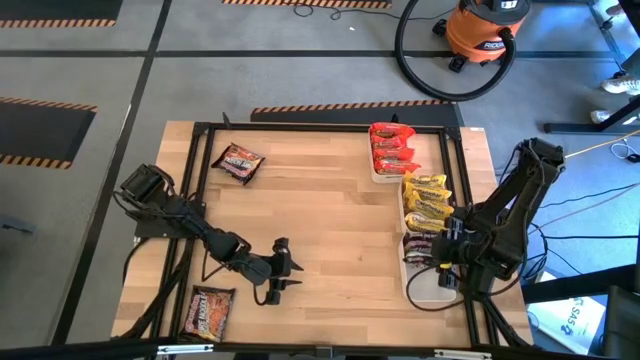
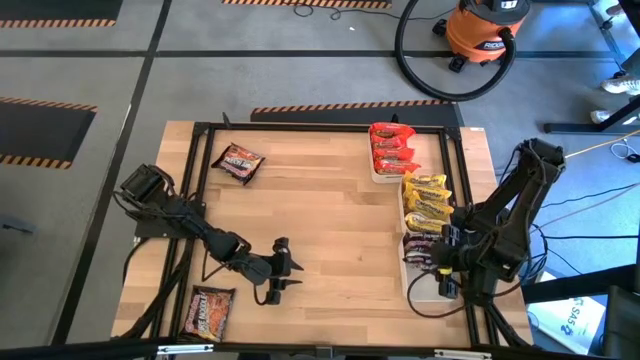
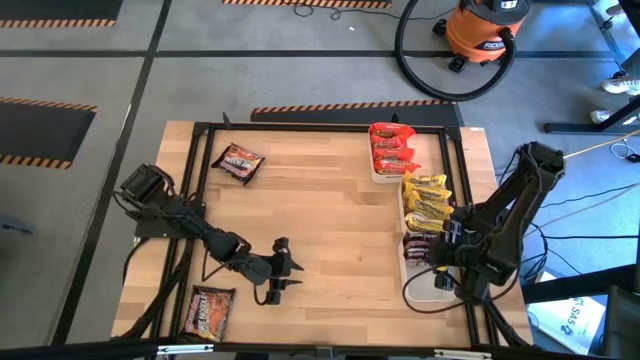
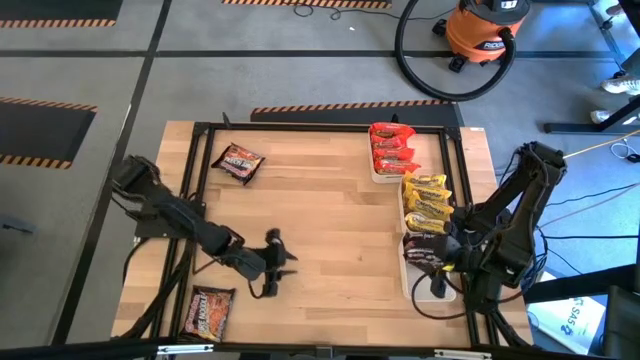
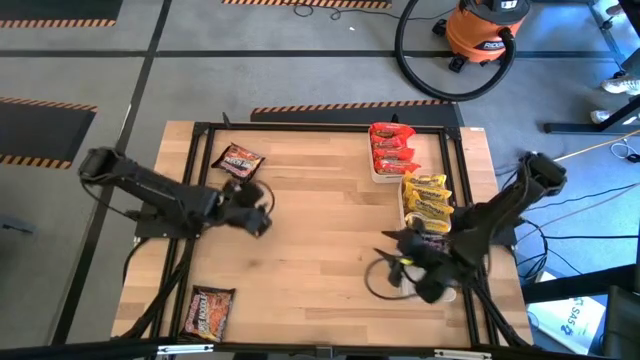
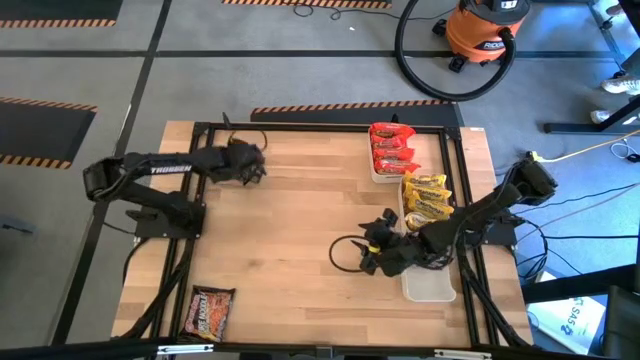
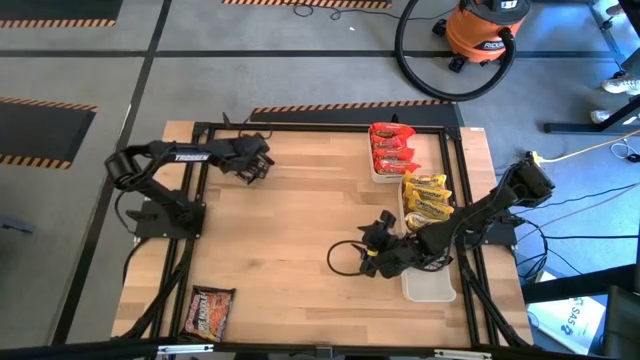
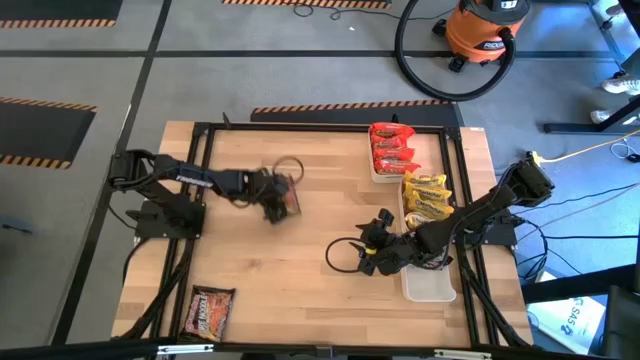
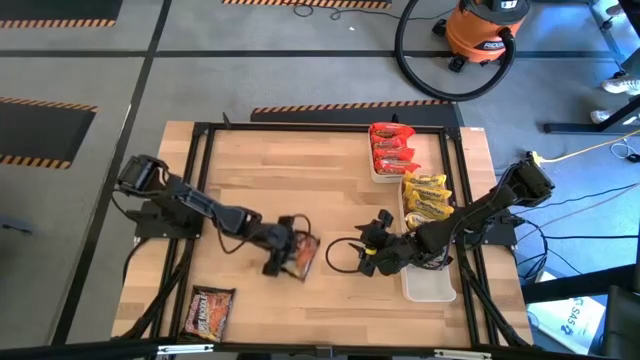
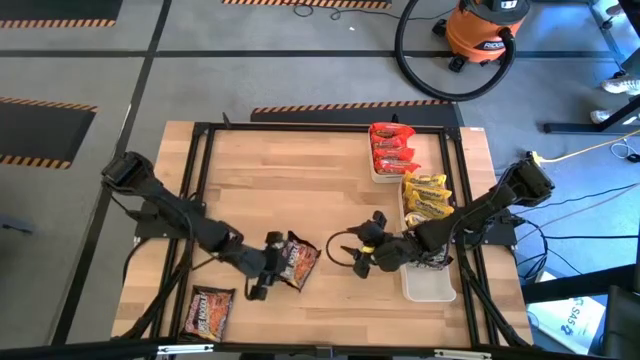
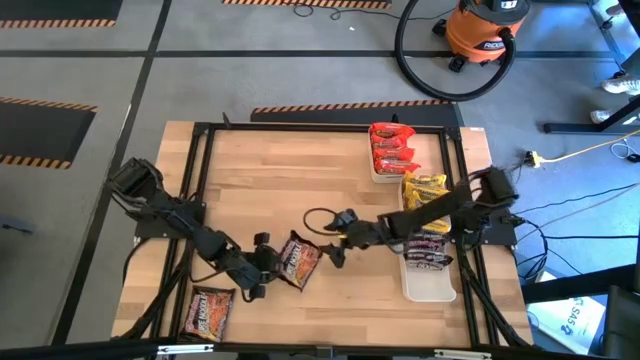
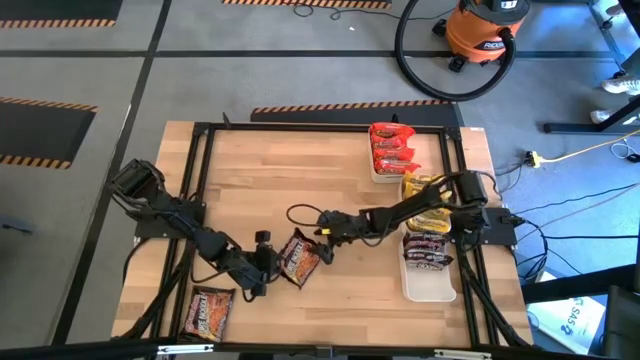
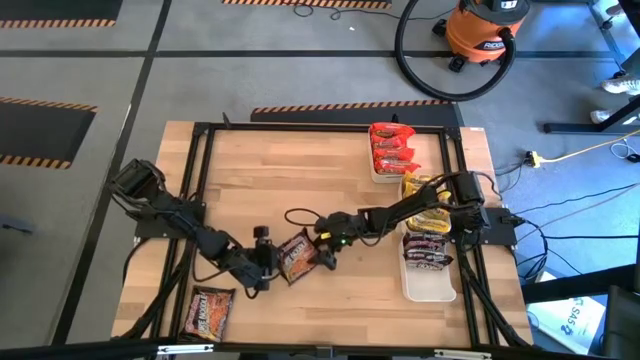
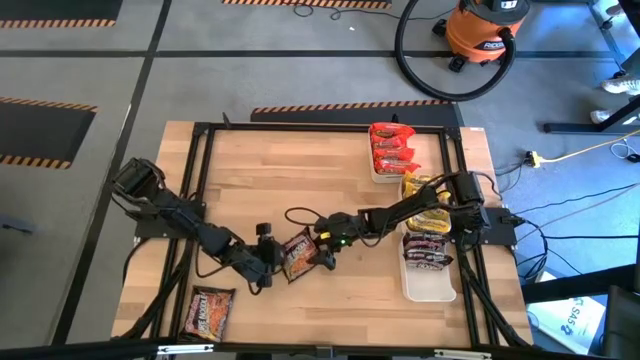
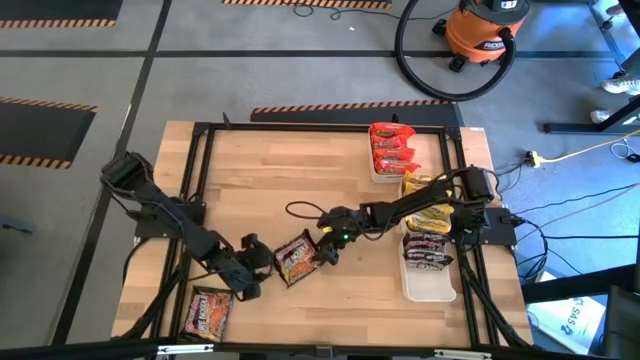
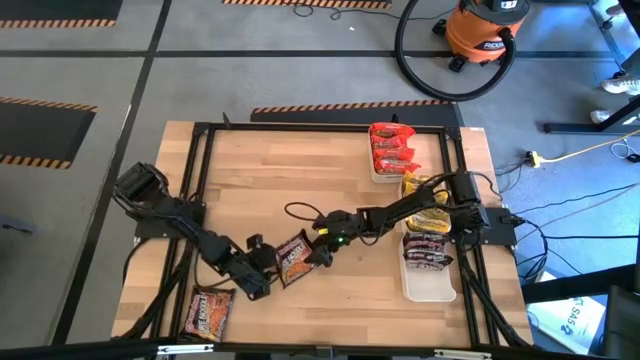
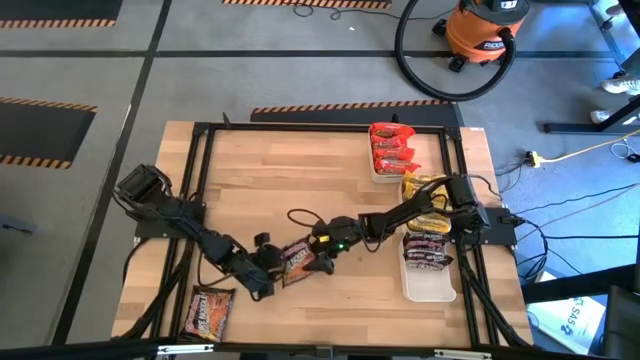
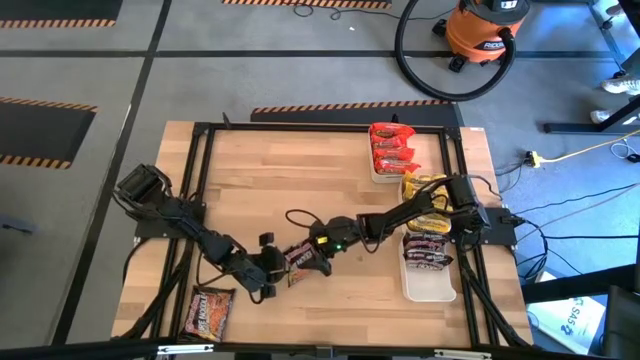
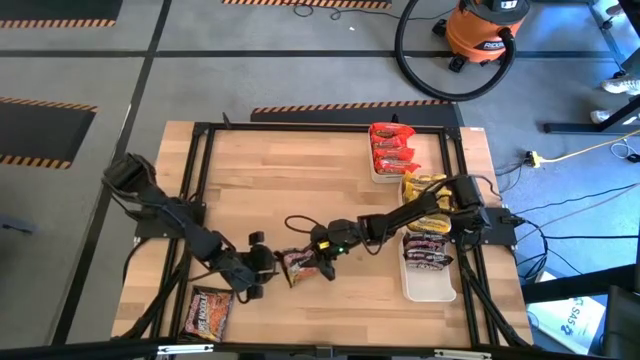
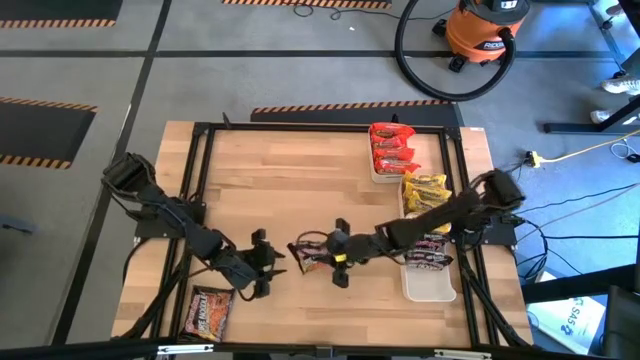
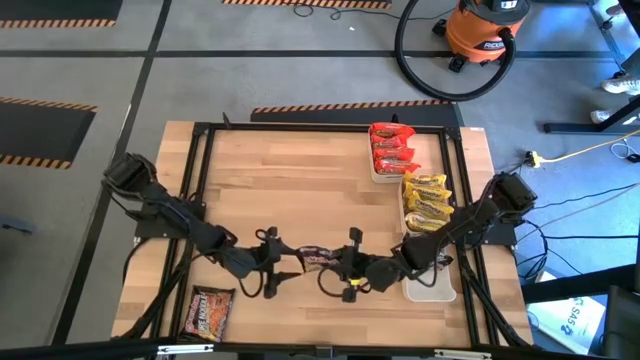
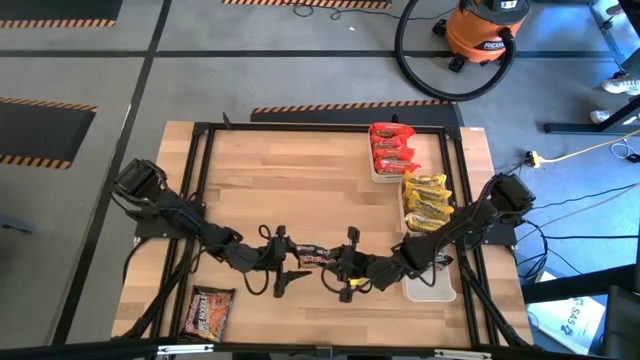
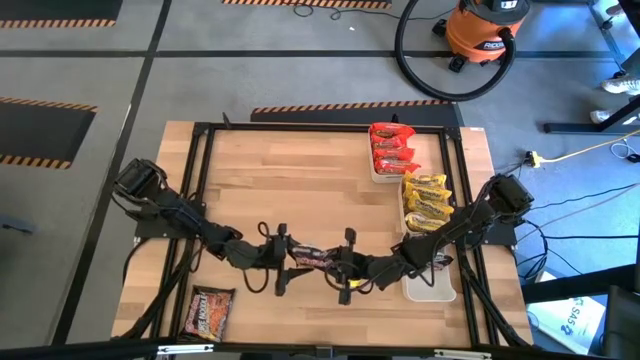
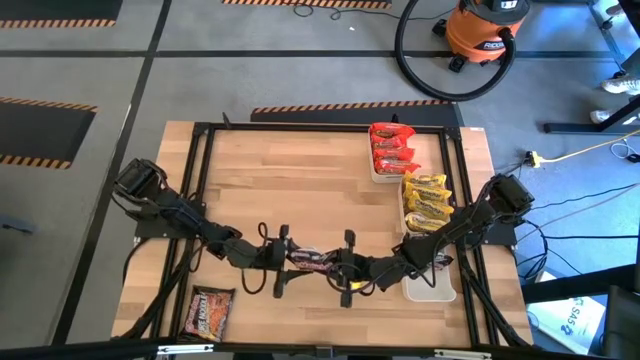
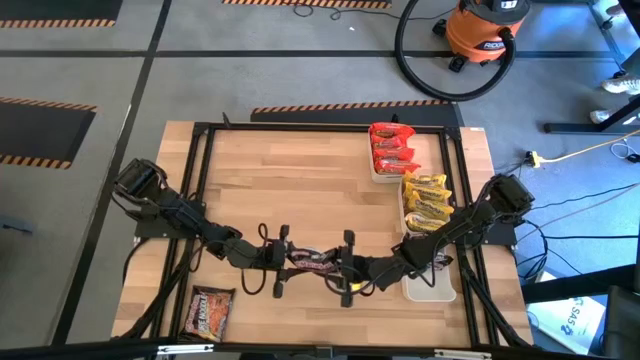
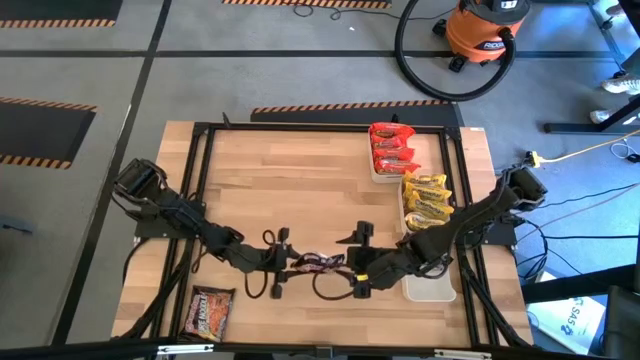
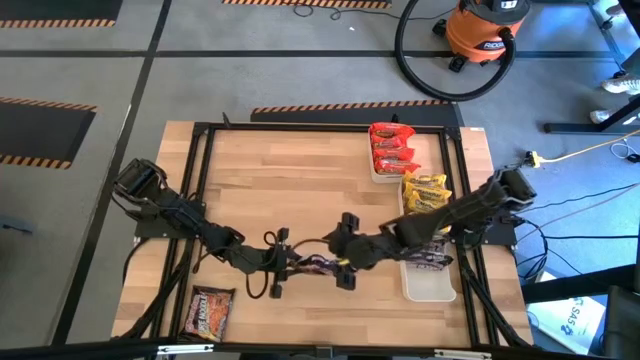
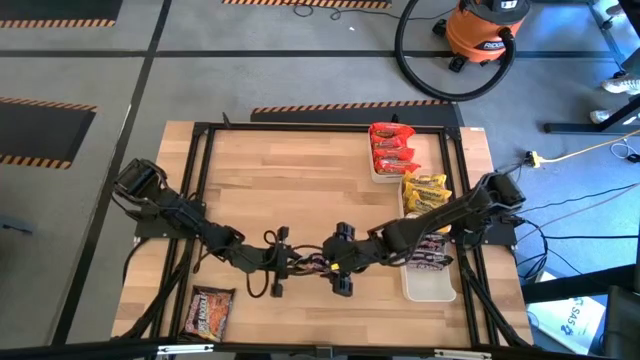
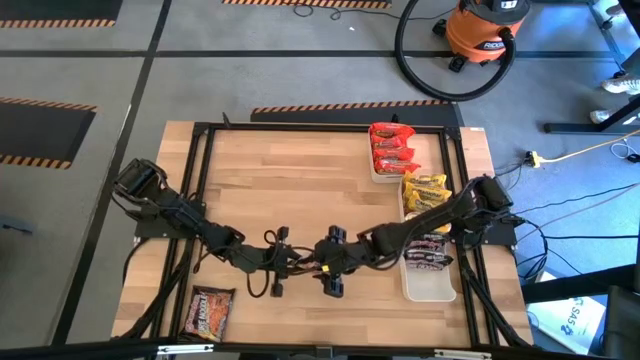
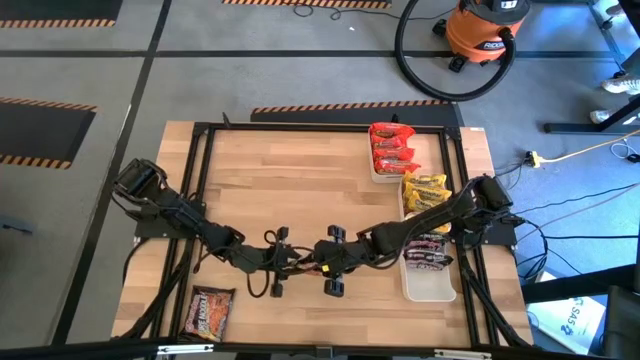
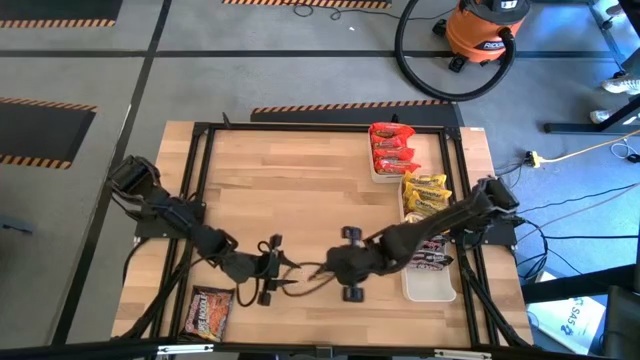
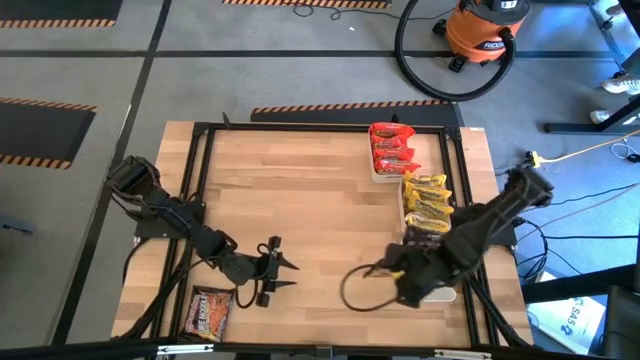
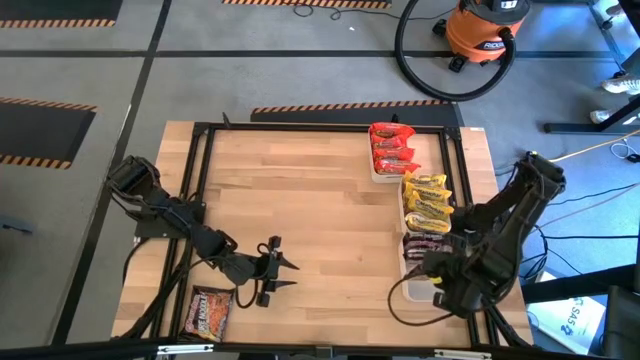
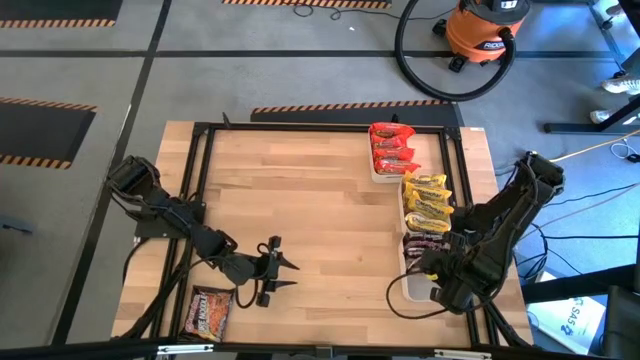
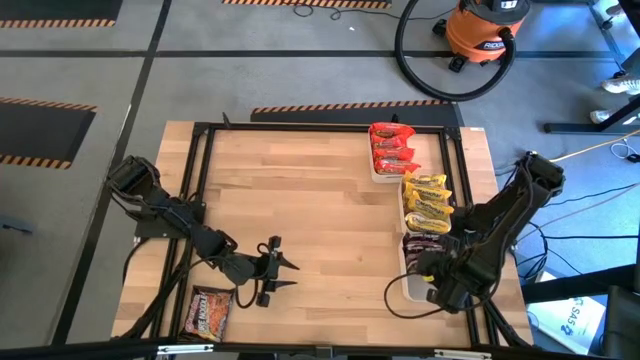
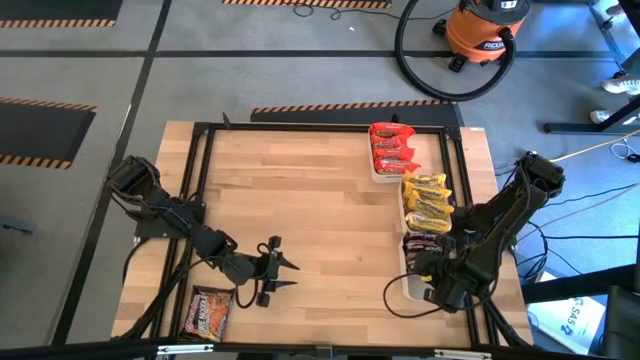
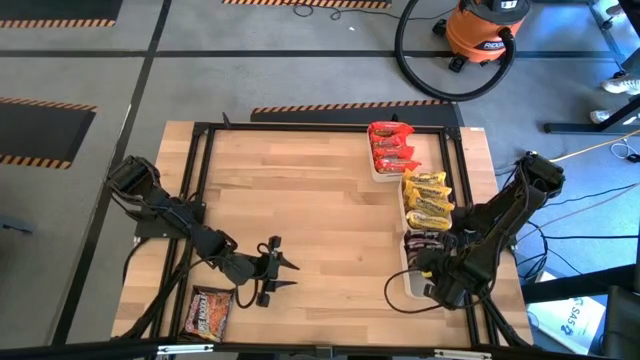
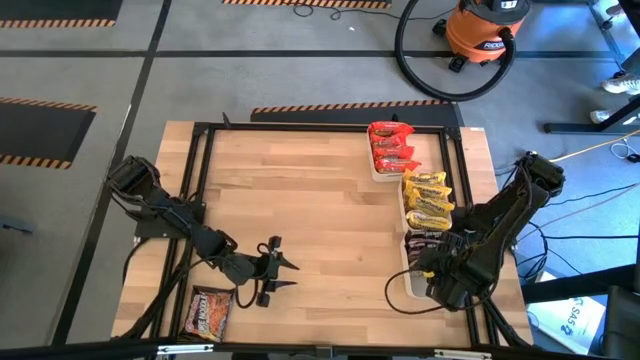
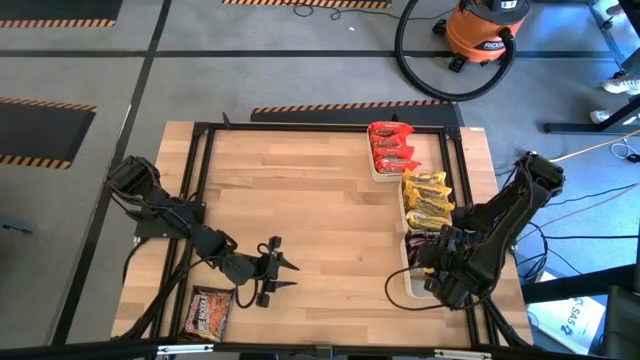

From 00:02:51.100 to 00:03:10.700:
Task: Sort Maruchan noodles
Put the black noodle pack into the bottom white bin

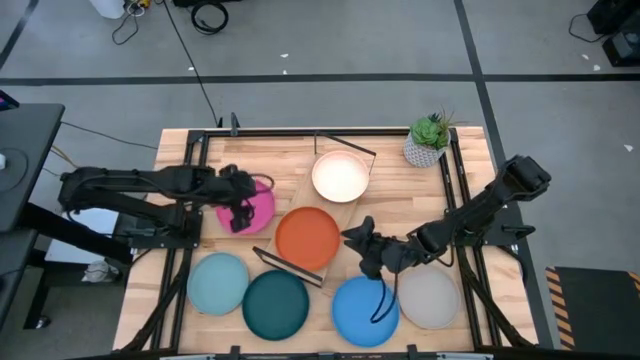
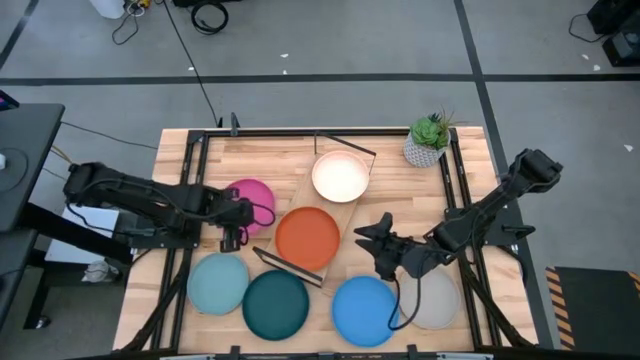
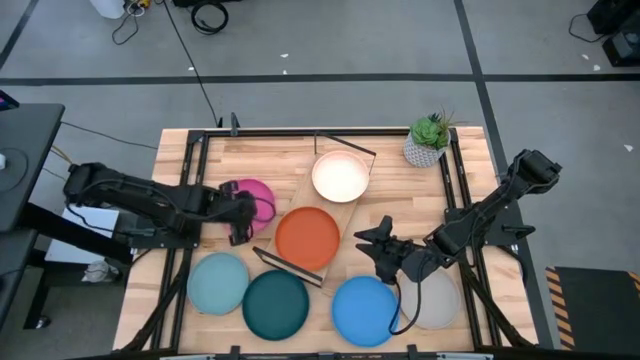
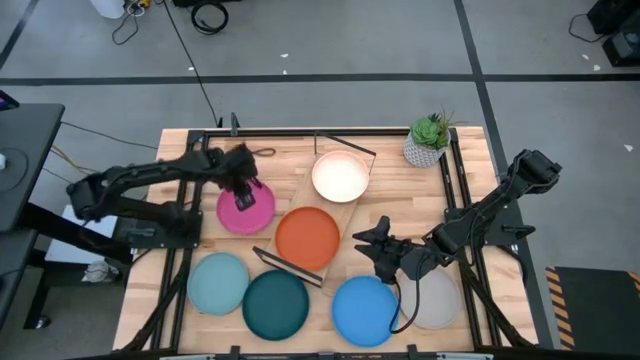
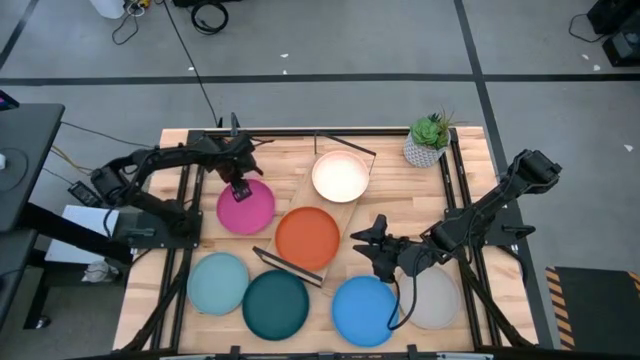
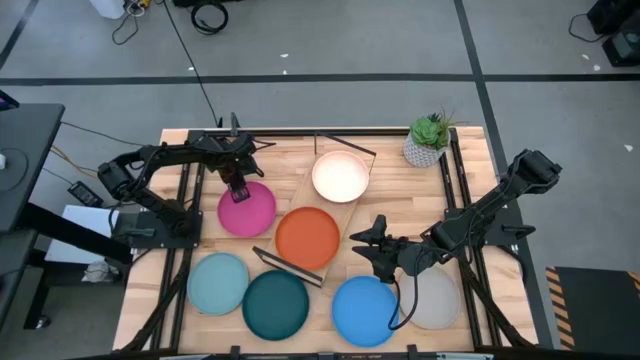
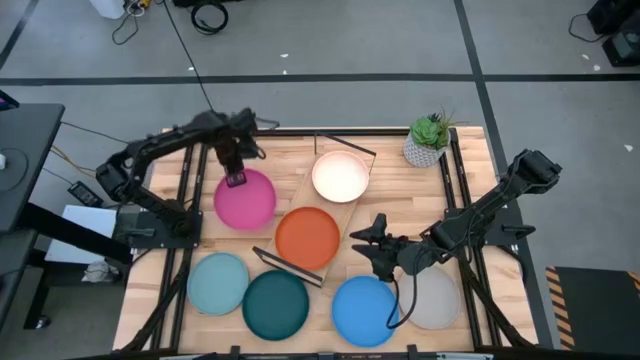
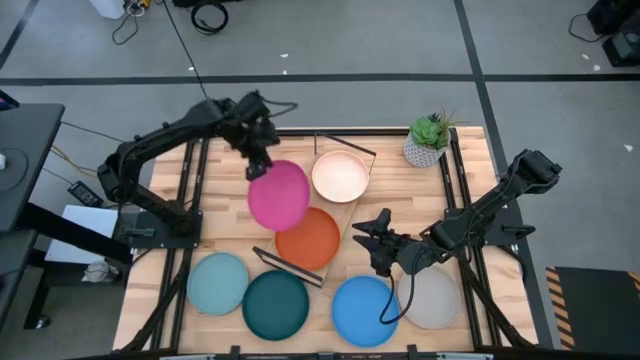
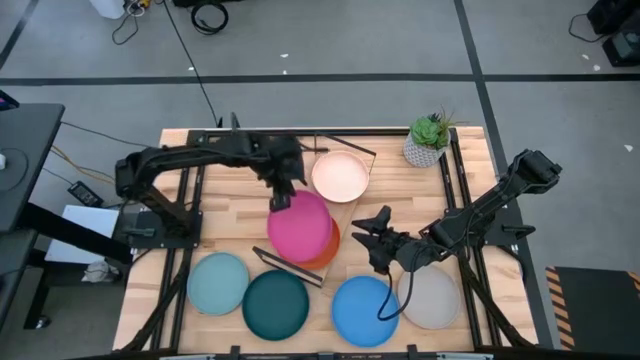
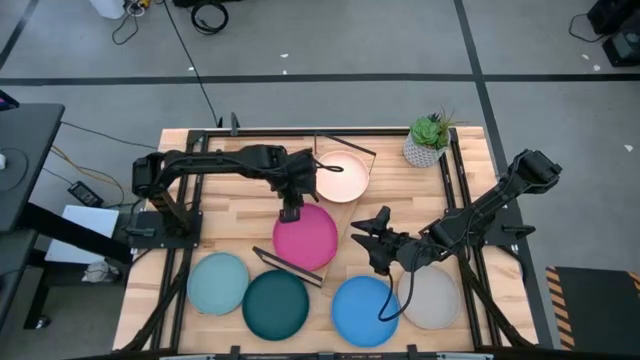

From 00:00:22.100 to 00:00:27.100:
Task: Place and stack plates onto a shelf
Stack the pink plate on top of the orange plate on the shelf
